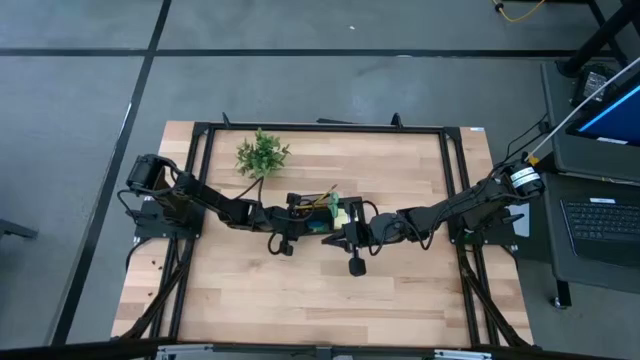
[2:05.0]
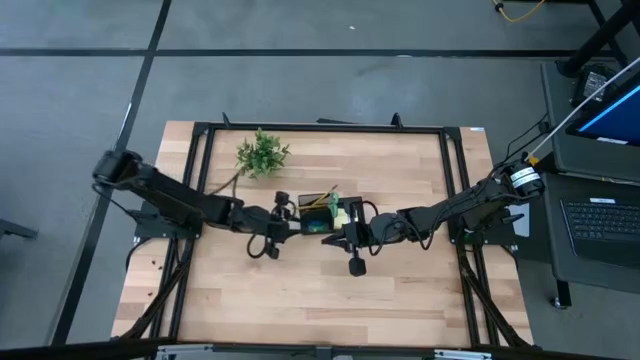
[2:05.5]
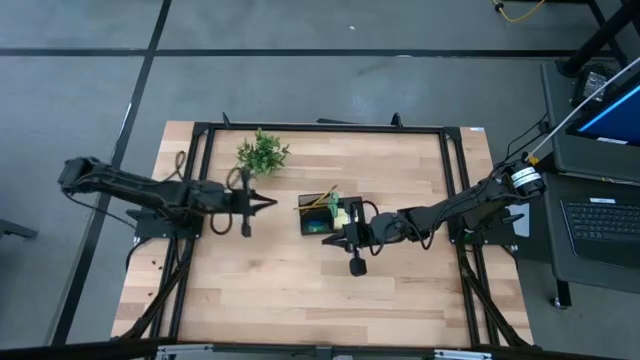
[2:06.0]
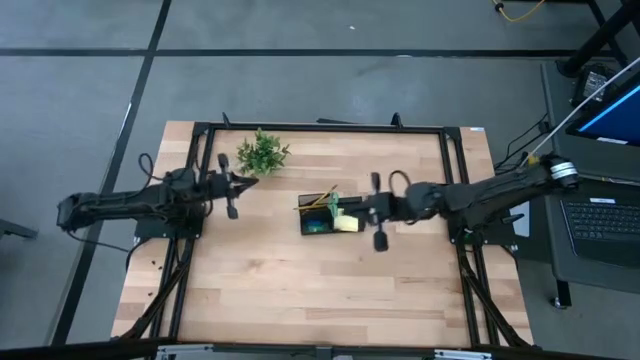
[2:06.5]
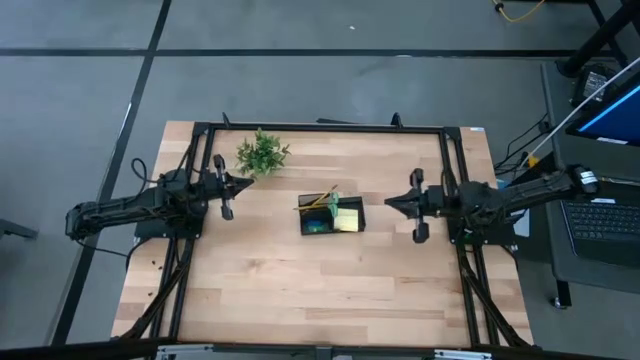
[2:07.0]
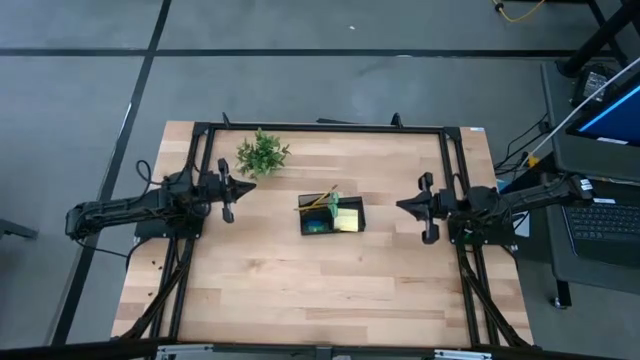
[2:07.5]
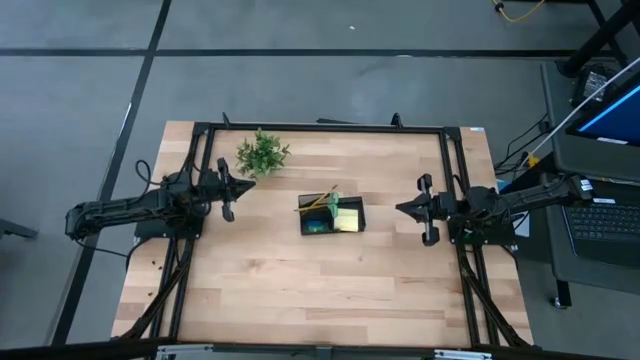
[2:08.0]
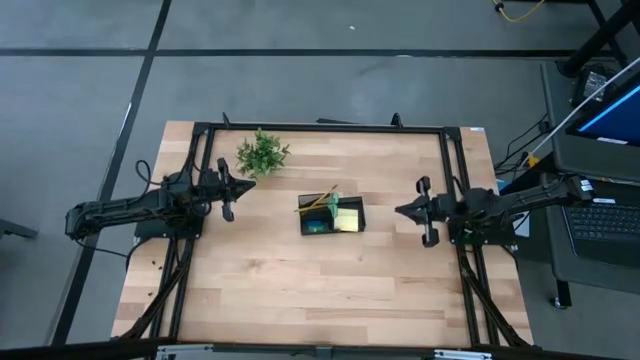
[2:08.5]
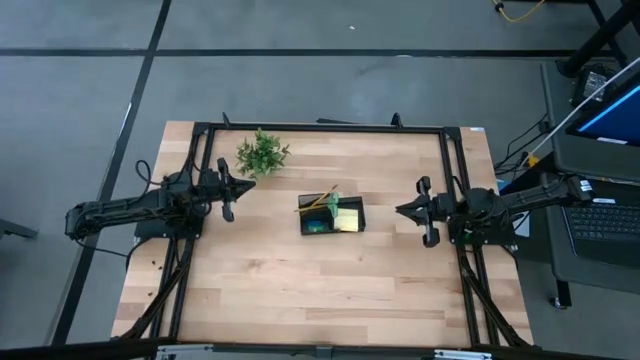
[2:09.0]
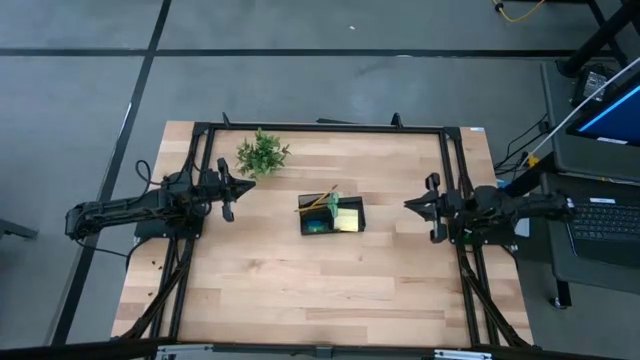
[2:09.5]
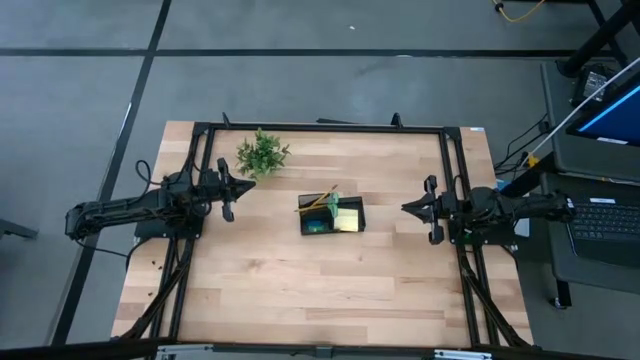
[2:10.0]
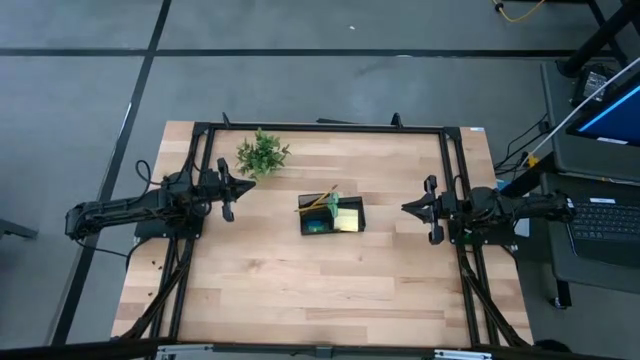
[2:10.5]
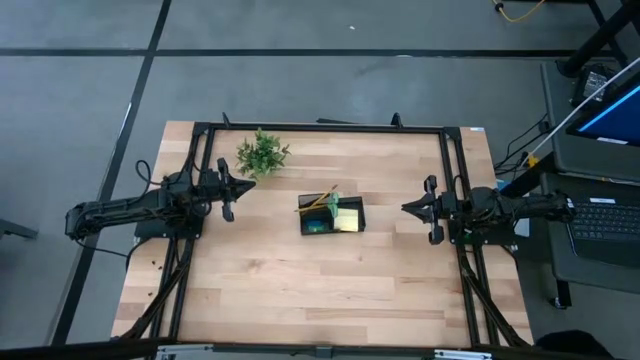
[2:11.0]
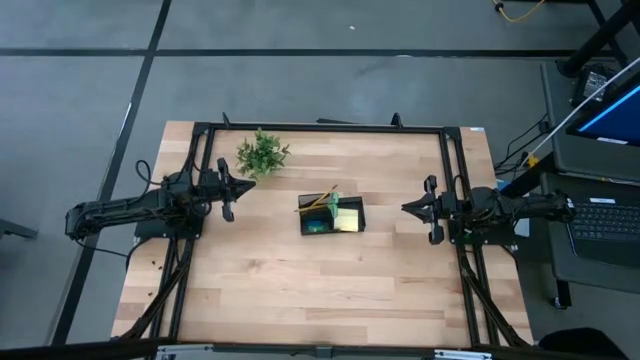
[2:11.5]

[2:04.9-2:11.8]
Task: Pick and place office supplies into organizer
Return to Home Position

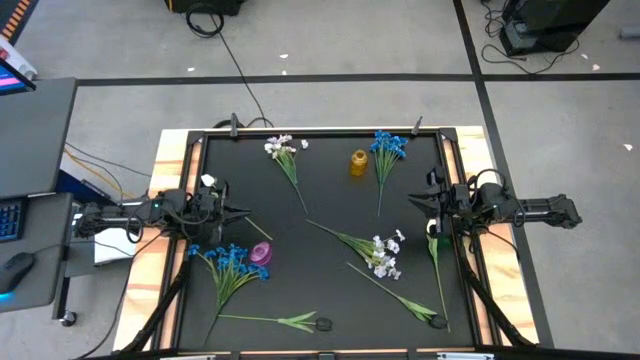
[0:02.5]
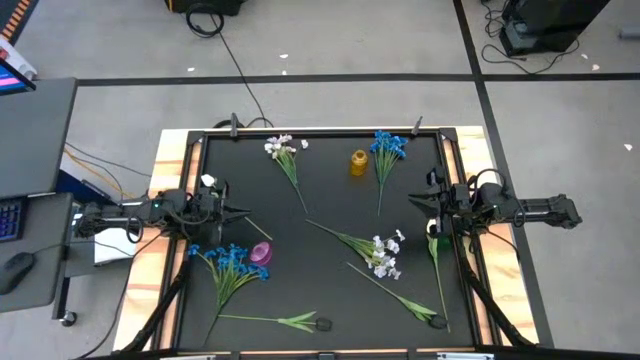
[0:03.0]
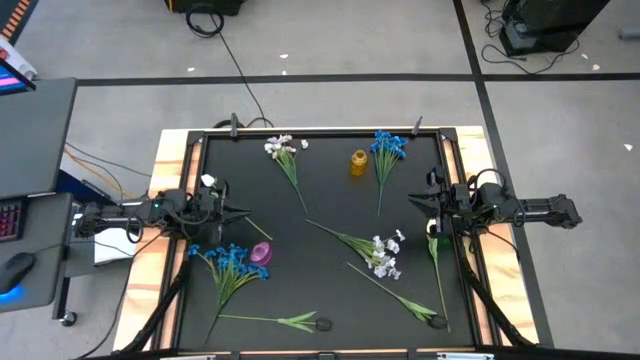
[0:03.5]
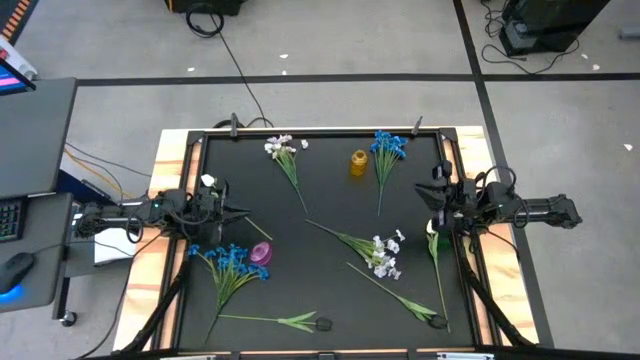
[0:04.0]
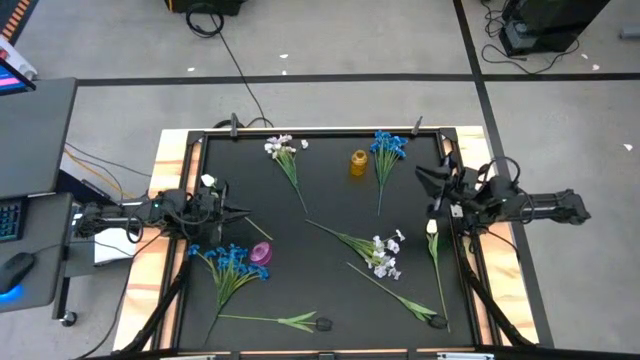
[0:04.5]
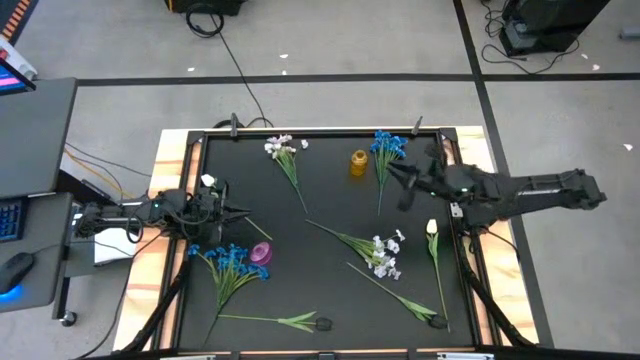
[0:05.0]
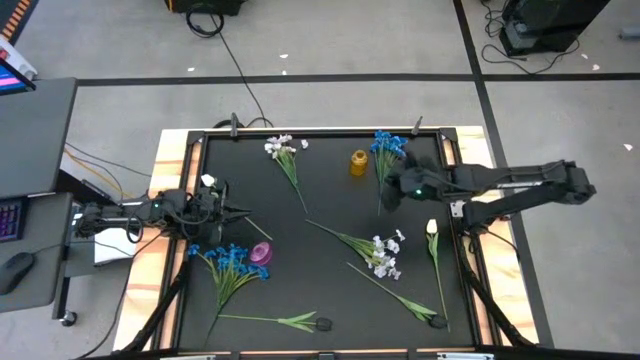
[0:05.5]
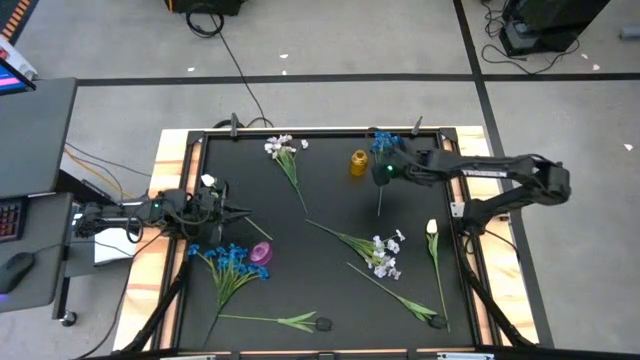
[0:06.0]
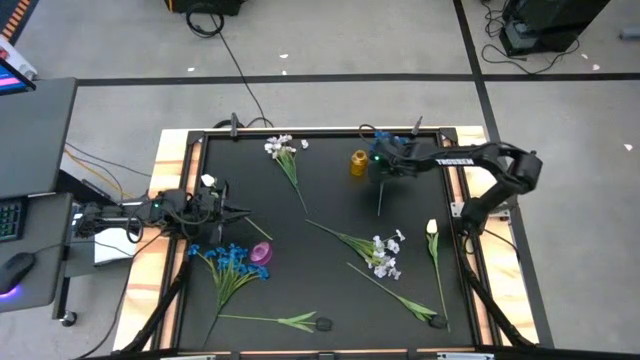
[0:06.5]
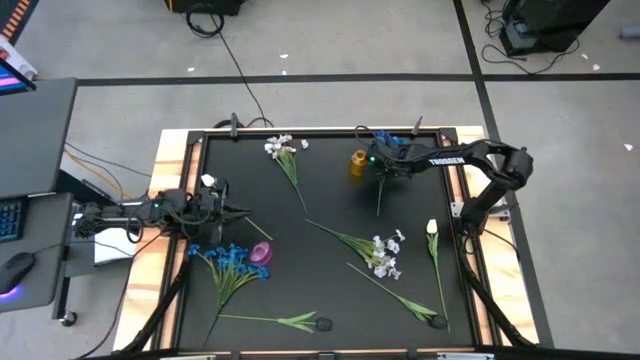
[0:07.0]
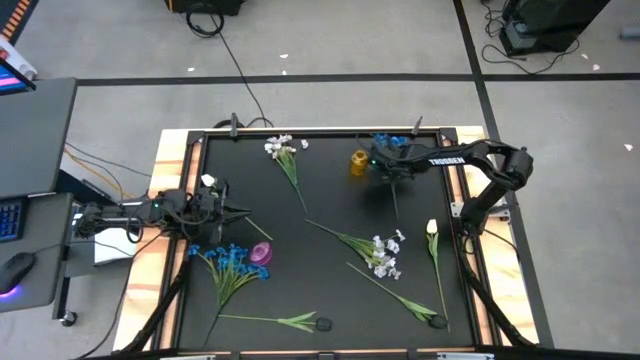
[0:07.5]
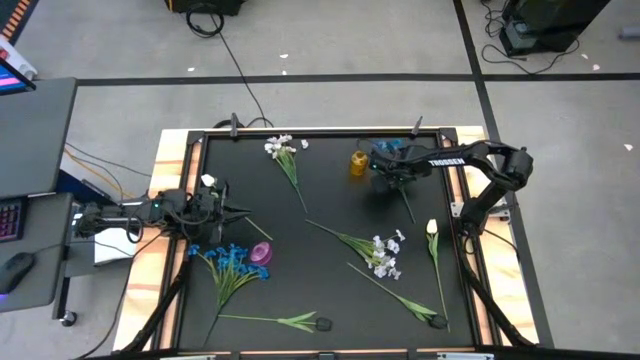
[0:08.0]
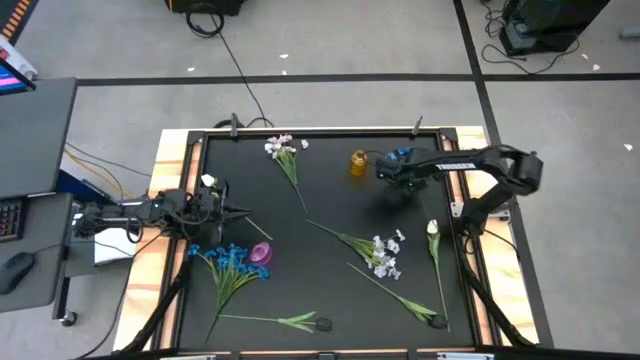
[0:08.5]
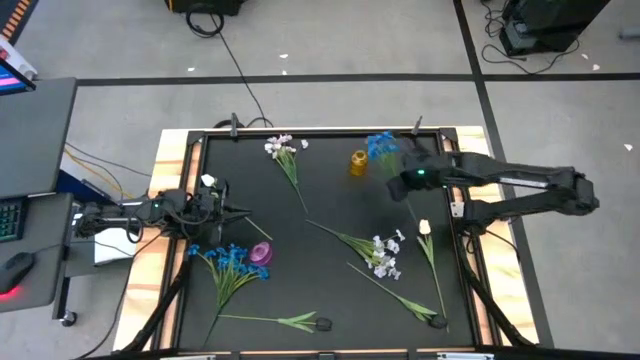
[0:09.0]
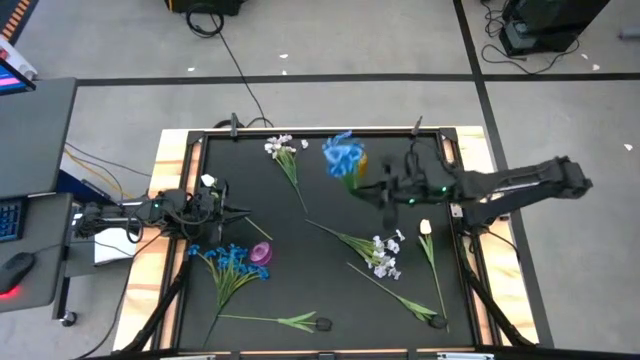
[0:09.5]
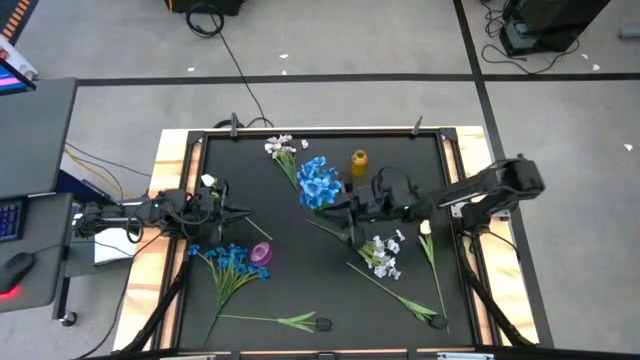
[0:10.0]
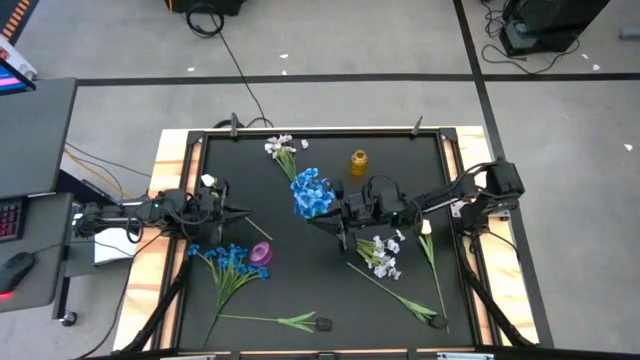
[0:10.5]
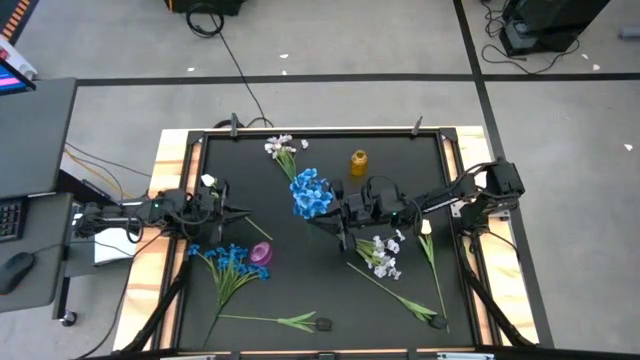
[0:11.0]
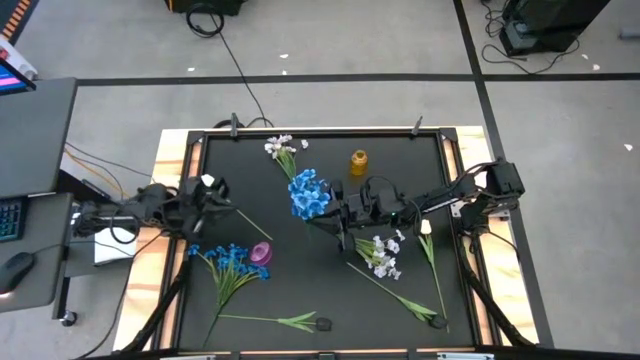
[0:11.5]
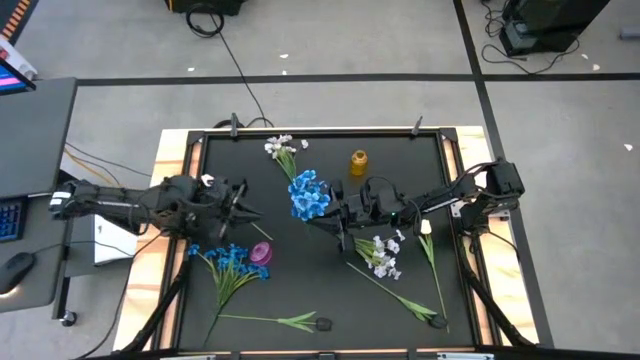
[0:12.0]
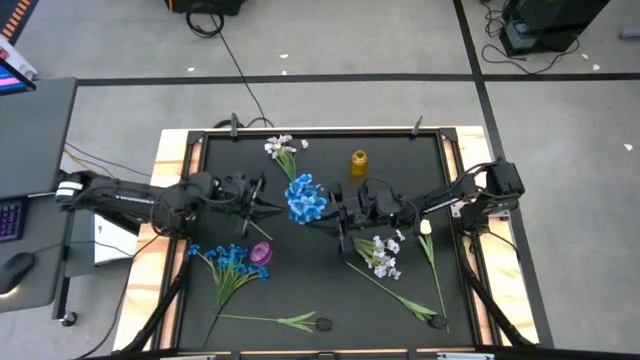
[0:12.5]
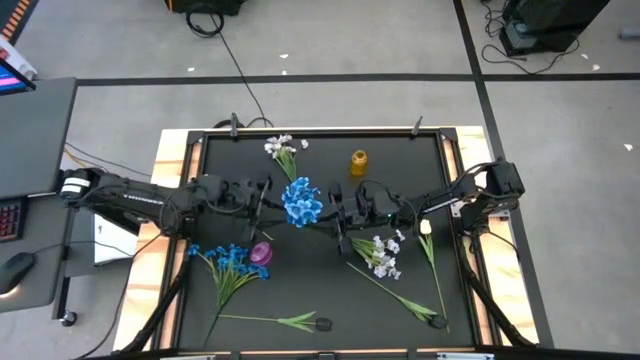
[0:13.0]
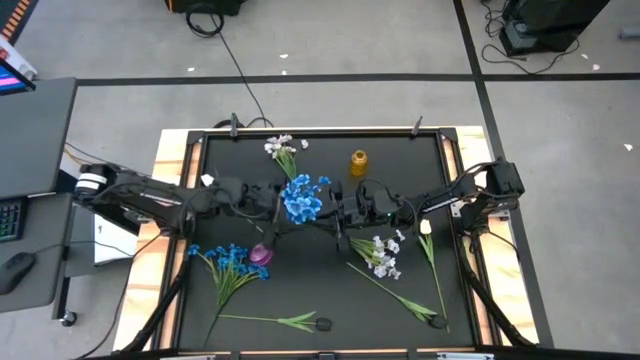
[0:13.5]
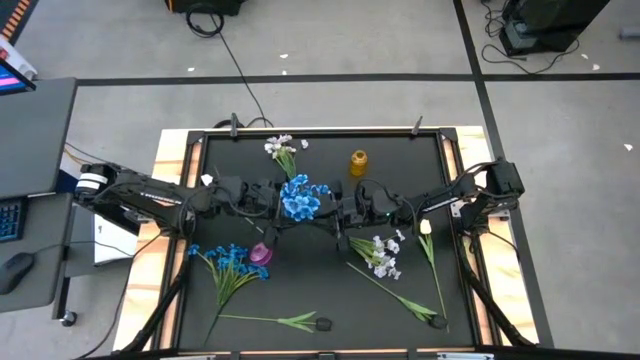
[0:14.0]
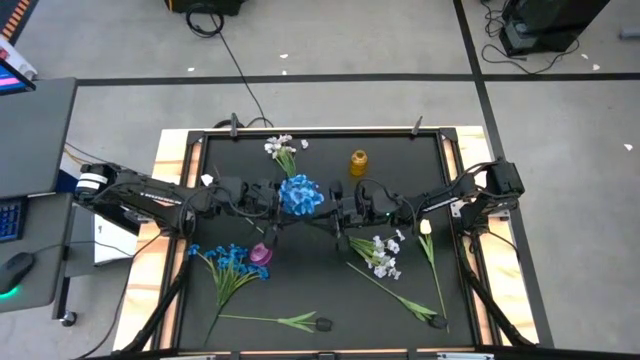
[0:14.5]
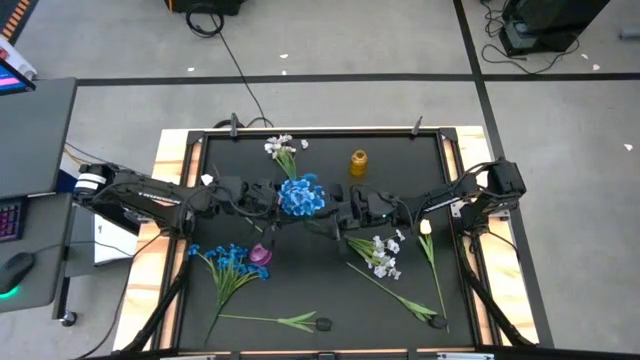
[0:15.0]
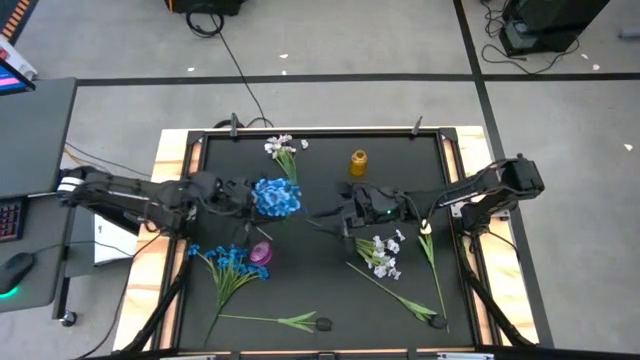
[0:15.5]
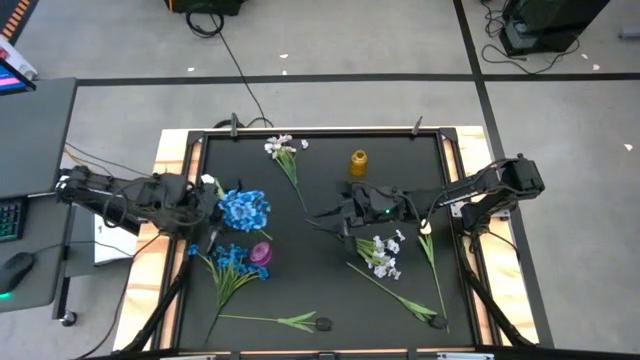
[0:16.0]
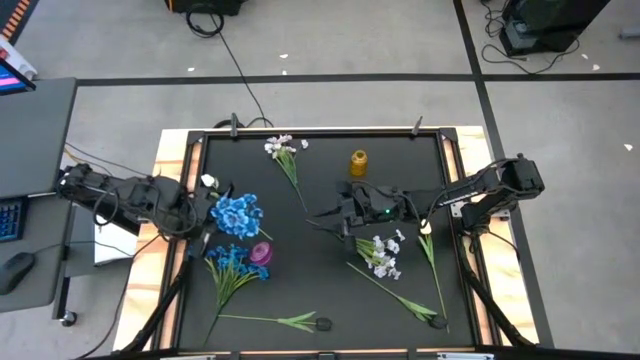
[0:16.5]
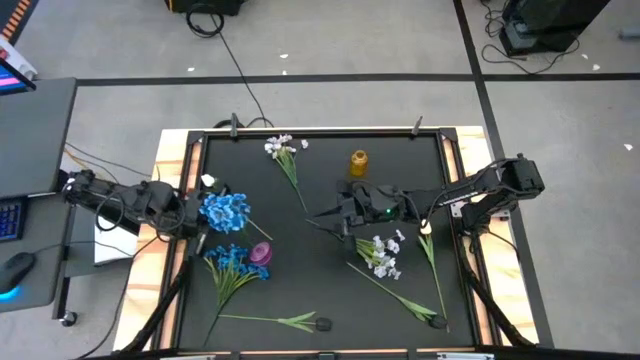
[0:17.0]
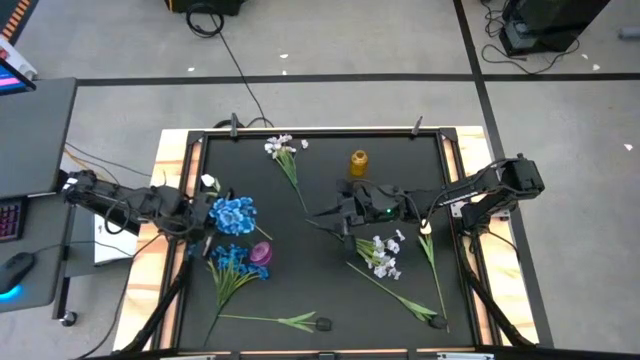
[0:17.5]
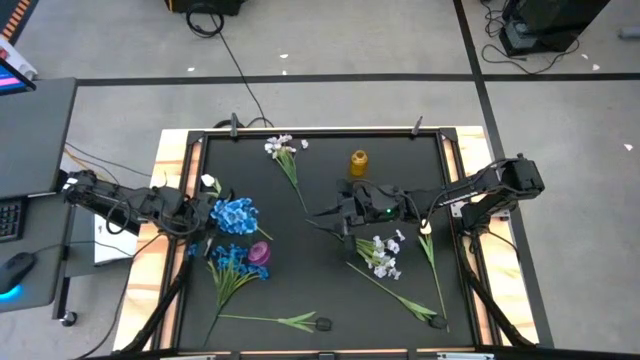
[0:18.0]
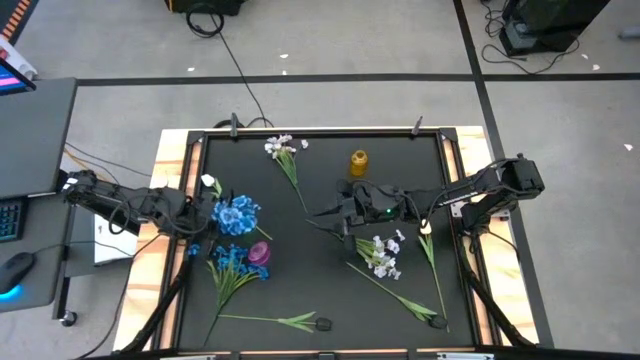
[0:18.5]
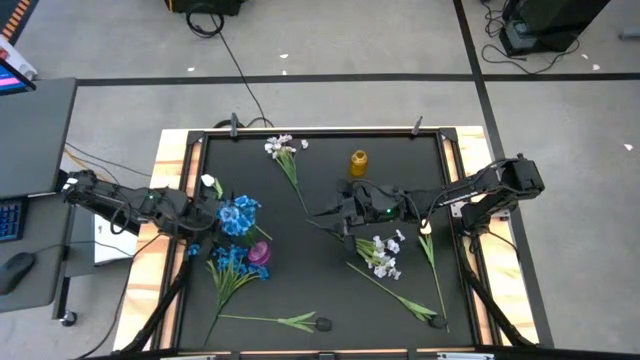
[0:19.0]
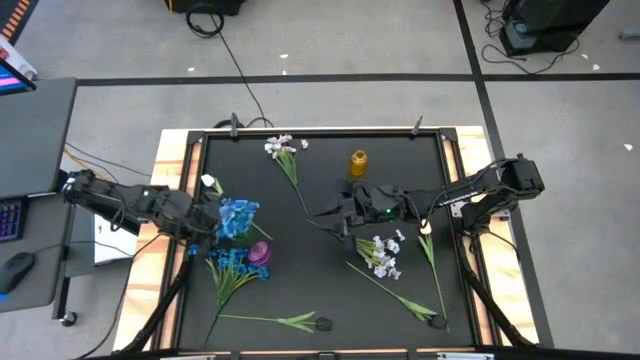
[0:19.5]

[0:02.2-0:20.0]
Task: Sort flowers into vase by color
Put the top blue flowers into the violet vase
